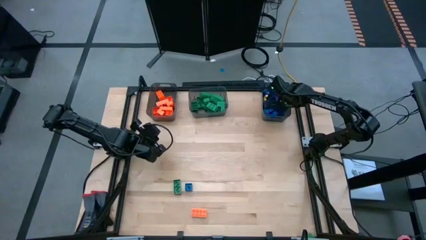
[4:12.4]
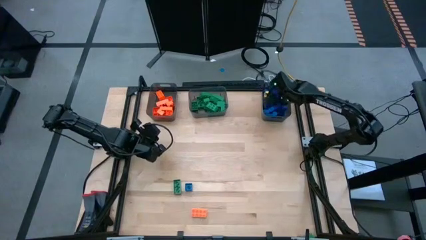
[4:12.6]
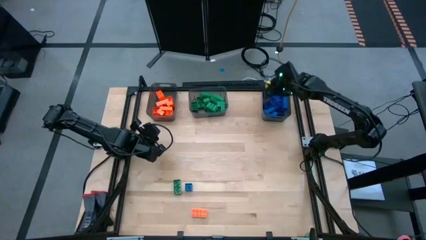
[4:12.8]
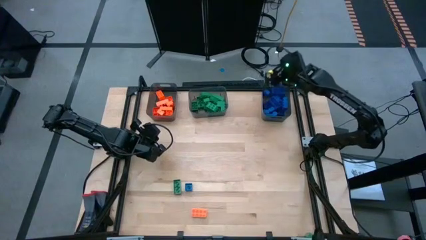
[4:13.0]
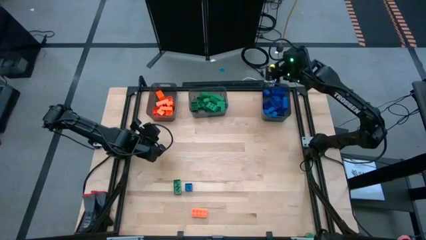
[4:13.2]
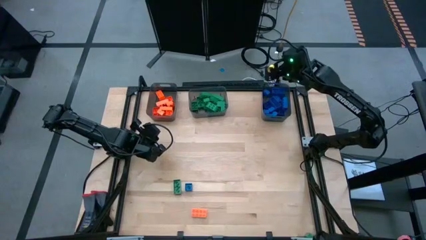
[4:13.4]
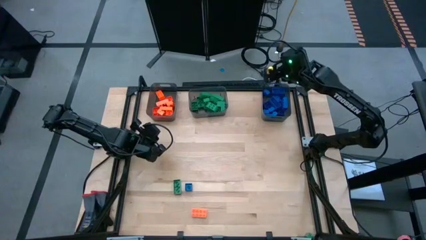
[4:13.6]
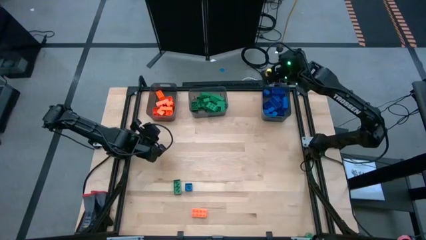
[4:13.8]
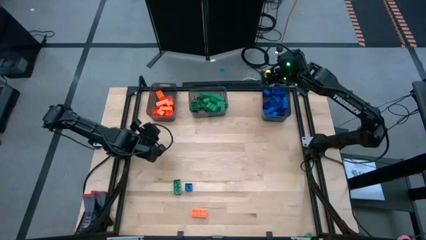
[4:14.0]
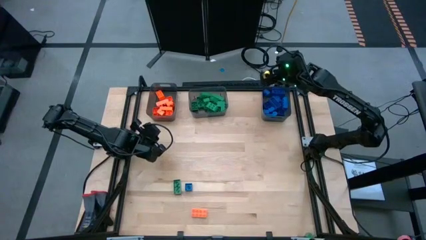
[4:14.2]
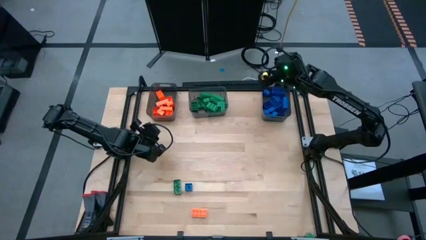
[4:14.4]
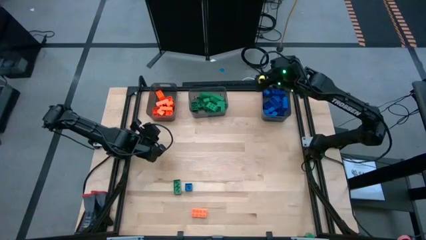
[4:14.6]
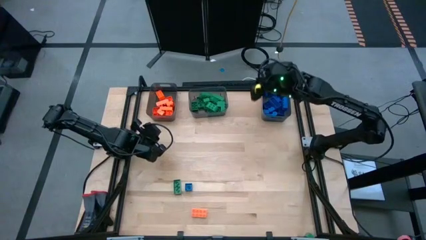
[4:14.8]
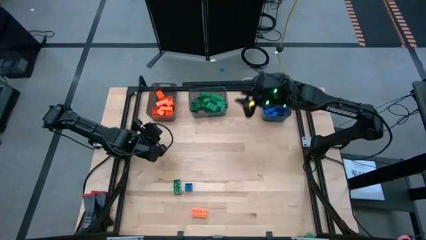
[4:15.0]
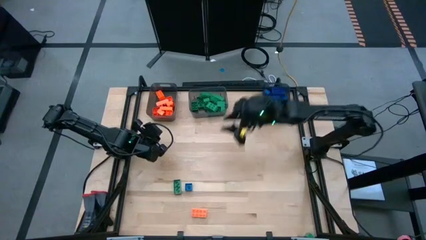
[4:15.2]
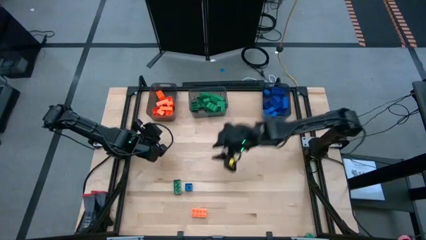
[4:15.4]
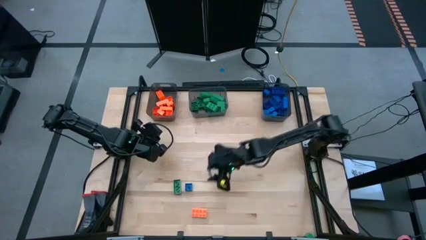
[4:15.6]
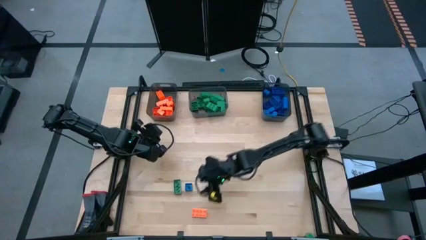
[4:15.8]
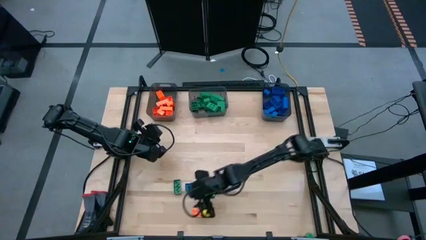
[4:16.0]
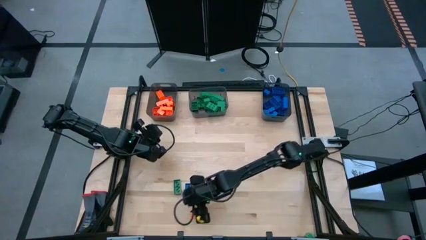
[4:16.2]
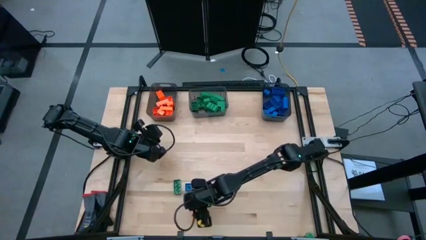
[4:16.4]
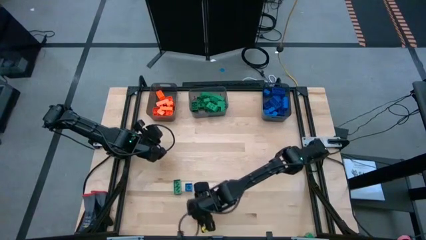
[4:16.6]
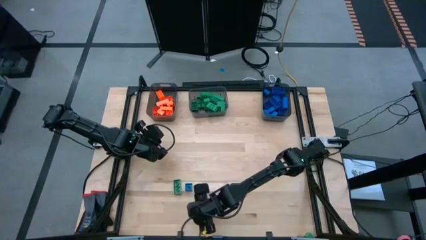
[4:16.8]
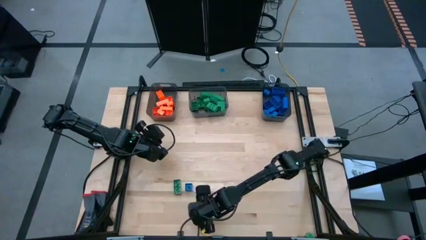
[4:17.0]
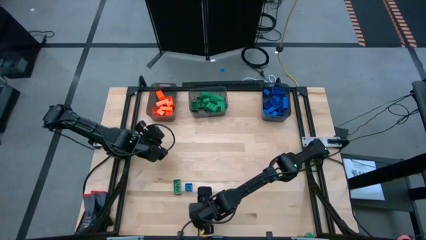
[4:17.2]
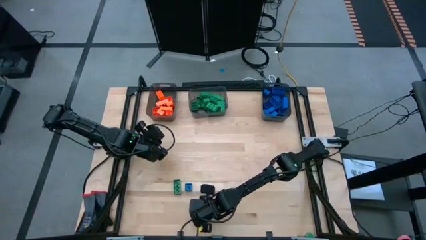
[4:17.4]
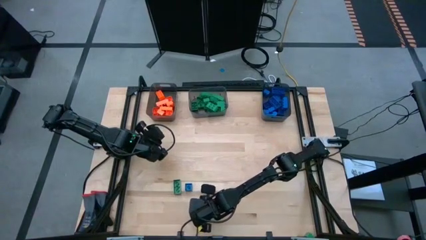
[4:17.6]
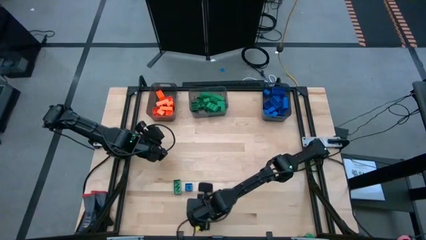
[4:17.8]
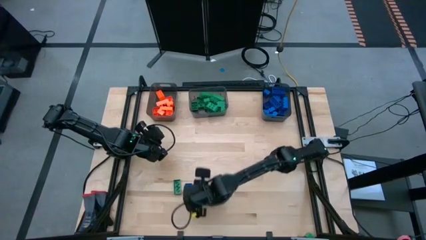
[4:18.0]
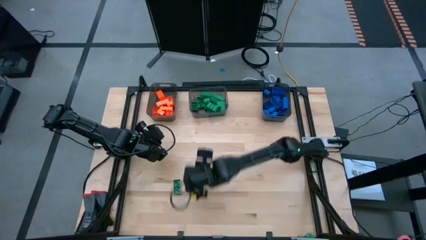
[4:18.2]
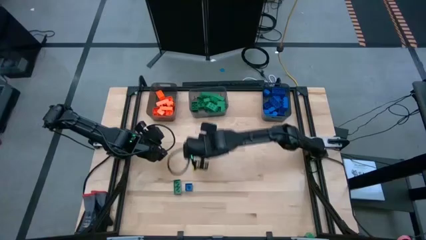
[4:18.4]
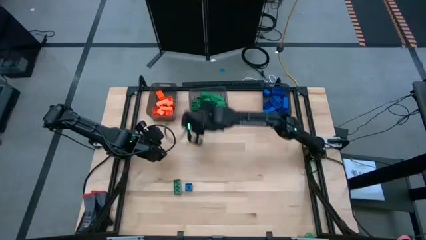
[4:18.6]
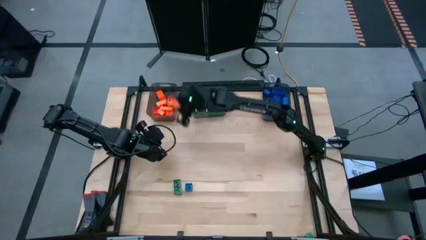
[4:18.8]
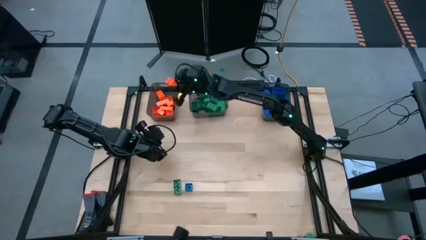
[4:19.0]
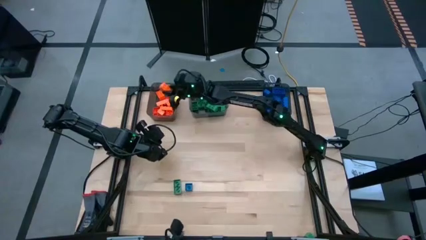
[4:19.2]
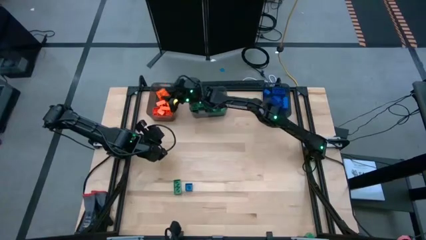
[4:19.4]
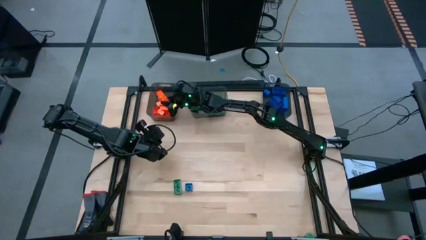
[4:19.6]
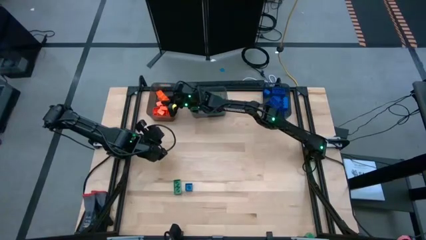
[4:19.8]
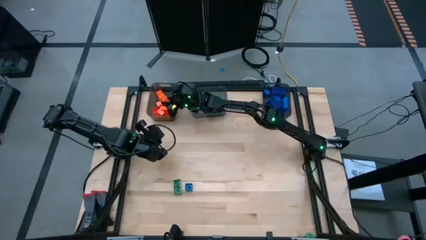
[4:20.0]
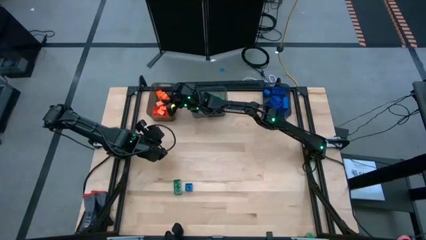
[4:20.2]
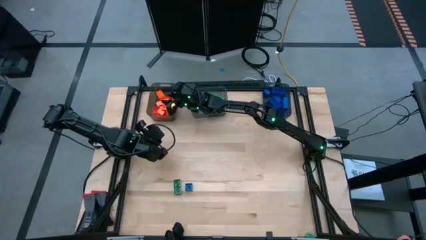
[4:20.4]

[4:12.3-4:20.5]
Task: Sort blocks
Put the orange game piece into the left black bin

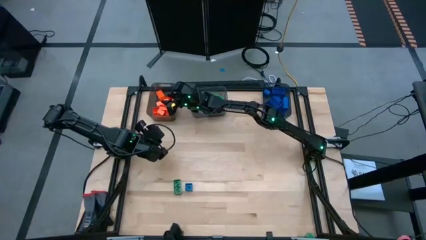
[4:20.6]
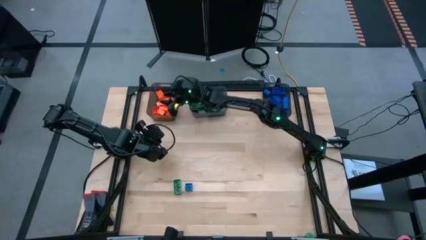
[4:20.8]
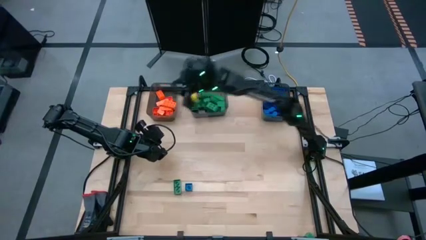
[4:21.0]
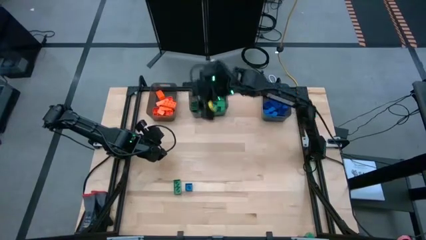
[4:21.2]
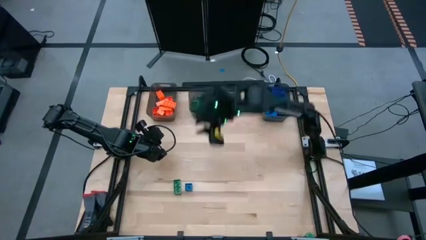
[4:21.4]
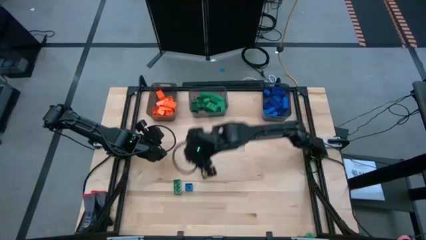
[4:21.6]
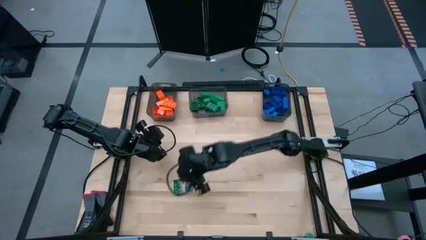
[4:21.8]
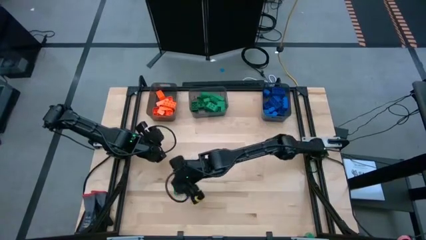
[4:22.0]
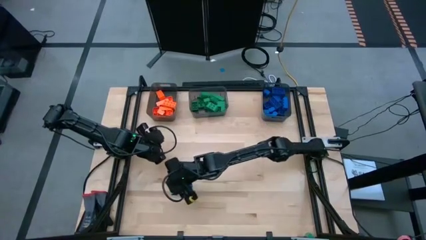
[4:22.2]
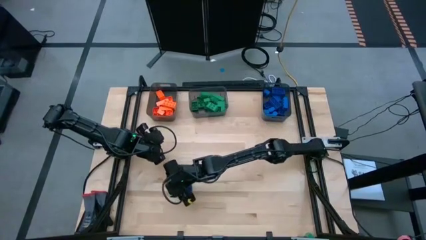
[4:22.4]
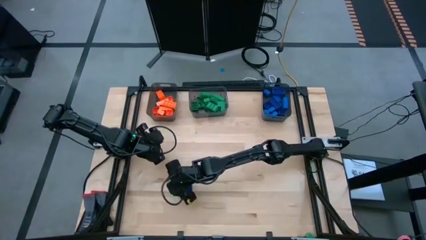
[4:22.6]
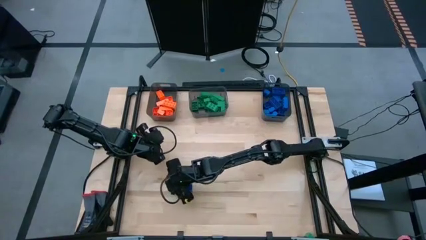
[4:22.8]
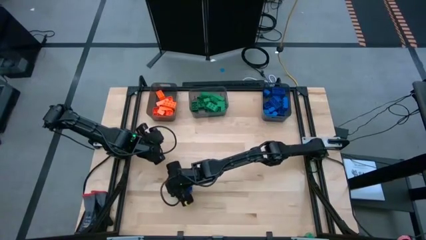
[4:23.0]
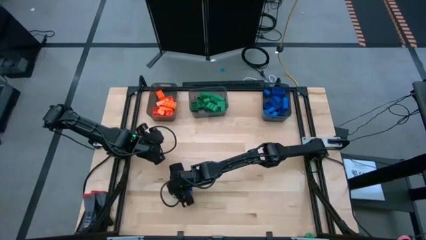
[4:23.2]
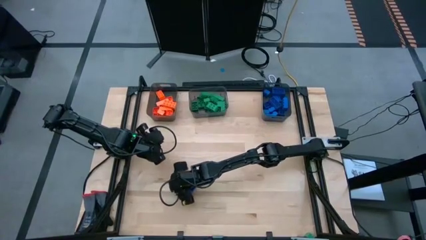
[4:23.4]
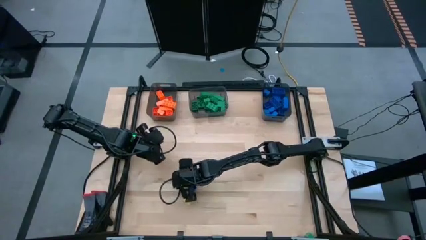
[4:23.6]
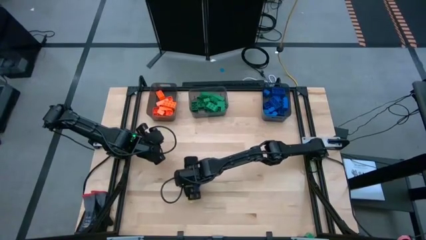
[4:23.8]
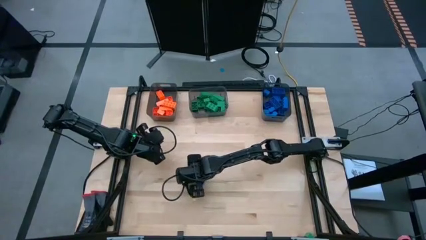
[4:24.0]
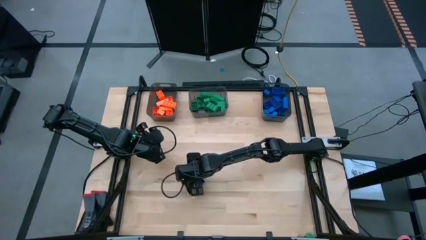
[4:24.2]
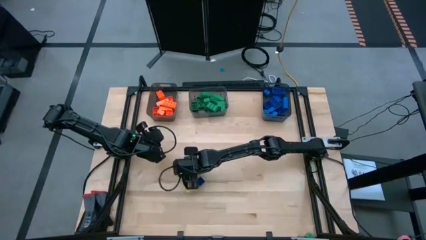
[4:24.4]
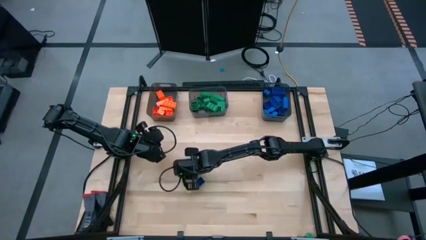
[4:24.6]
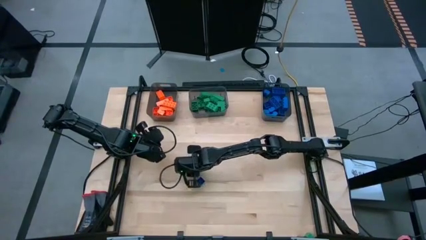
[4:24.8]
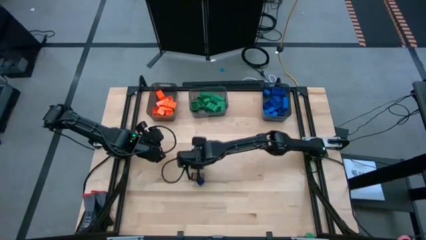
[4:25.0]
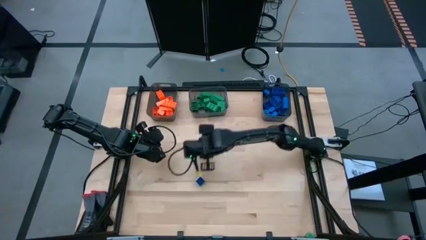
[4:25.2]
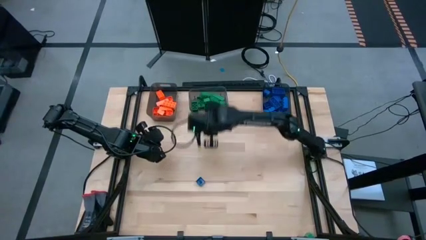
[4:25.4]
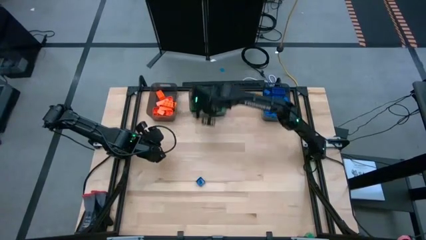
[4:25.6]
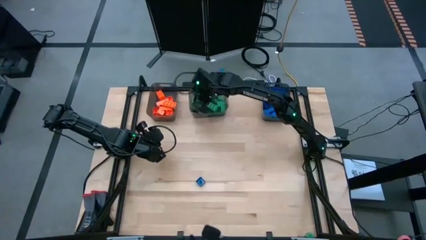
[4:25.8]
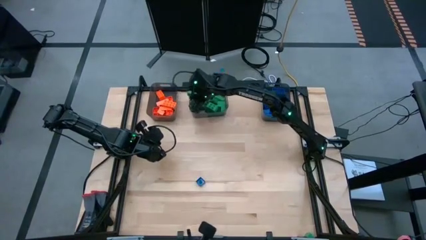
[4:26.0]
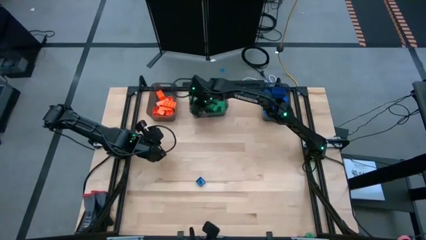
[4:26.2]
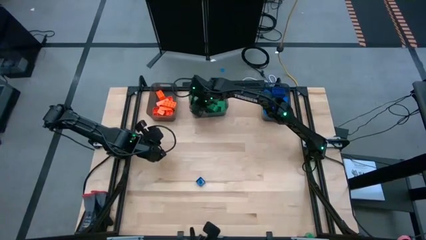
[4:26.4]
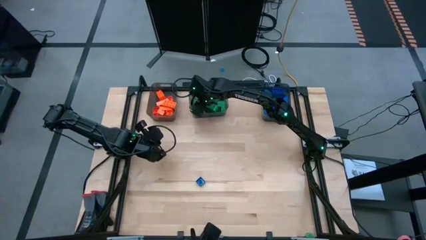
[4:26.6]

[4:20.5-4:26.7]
Put the green piece into the middle black bin

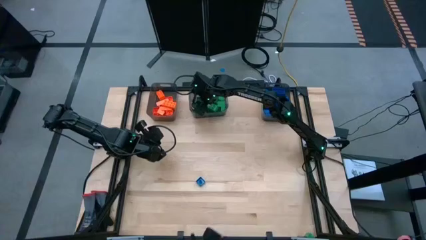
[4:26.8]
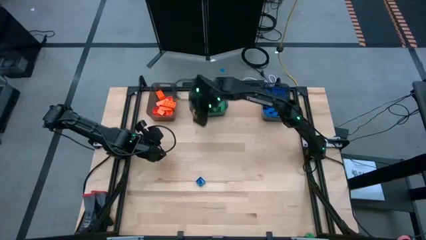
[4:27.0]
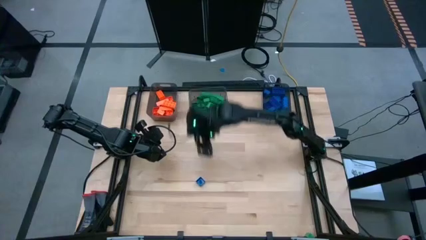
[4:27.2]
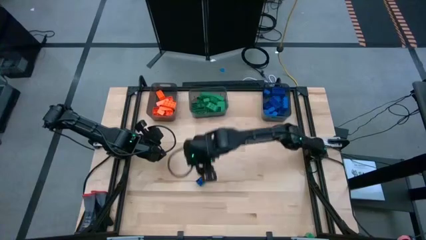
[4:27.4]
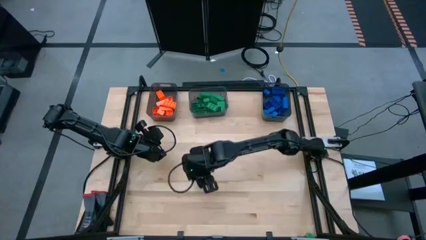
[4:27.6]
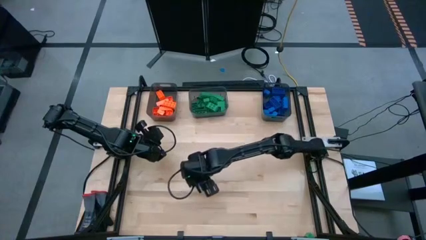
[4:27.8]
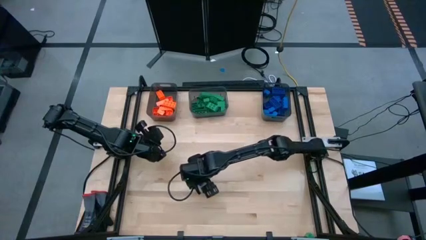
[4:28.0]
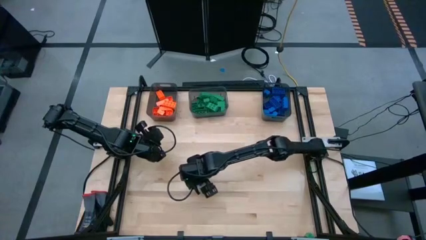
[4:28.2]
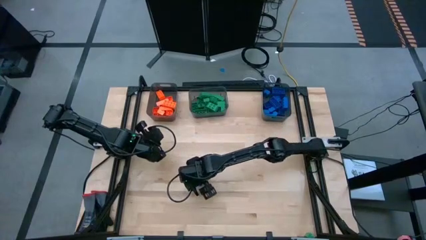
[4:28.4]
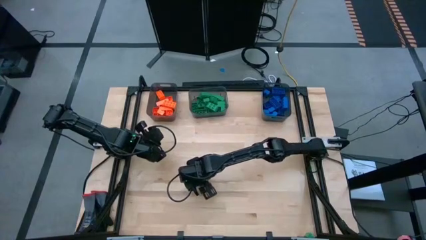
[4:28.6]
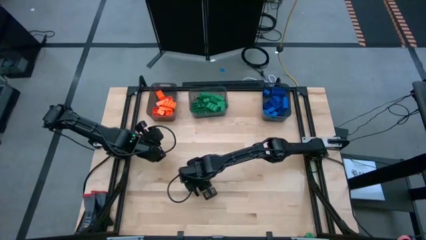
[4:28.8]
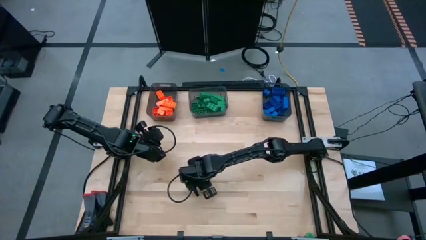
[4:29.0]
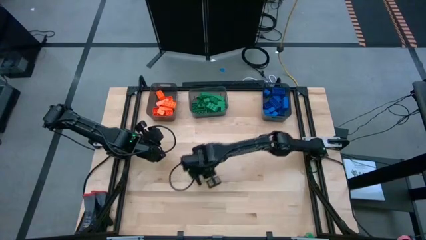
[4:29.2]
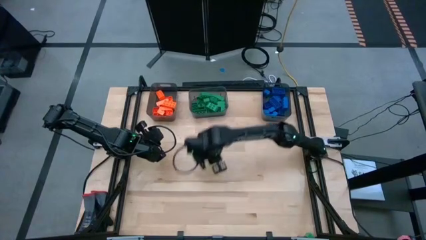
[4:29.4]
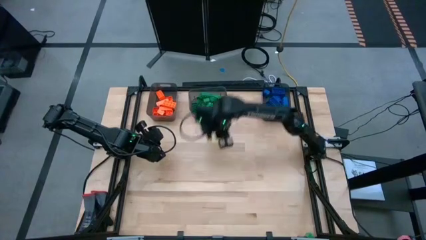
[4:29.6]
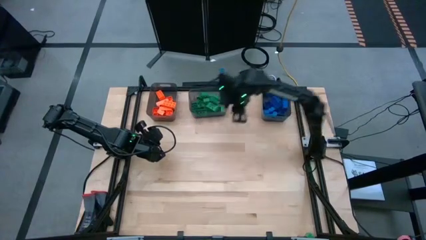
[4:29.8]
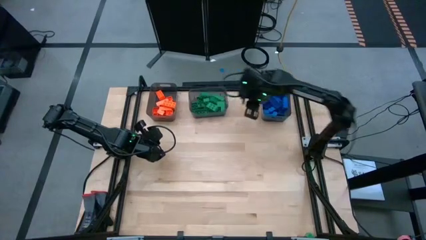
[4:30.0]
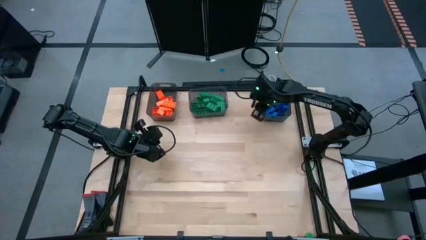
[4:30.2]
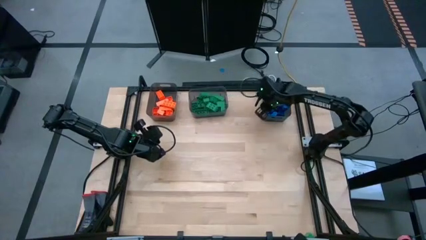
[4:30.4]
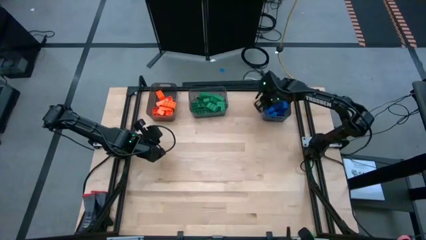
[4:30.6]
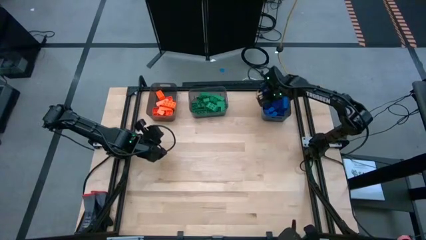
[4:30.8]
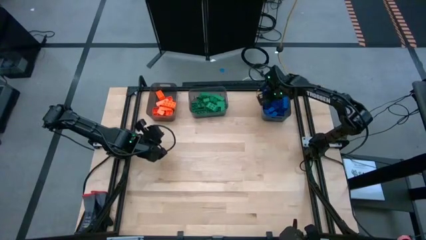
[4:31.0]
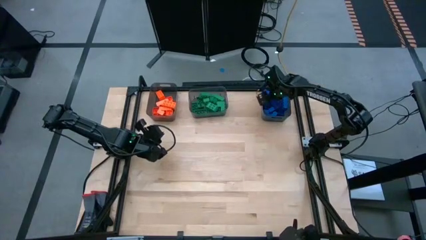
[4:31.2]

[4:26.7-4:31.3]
Put the blue game piece into the right black bin
